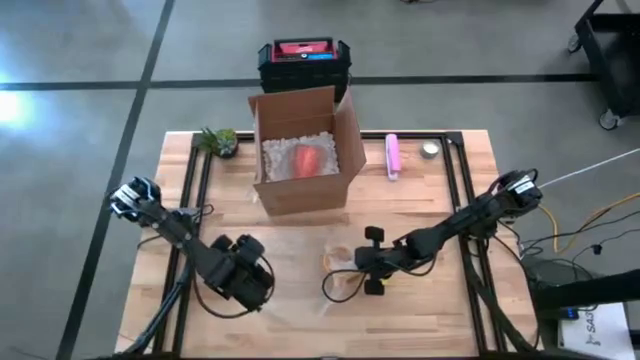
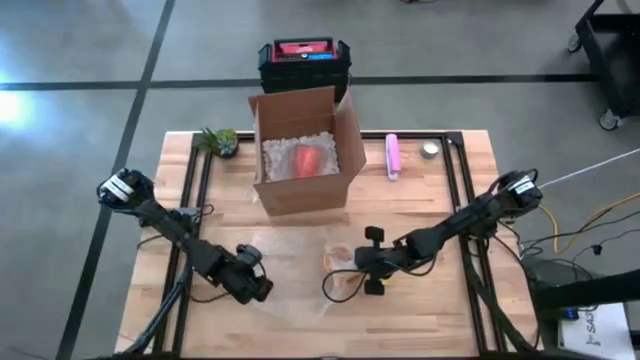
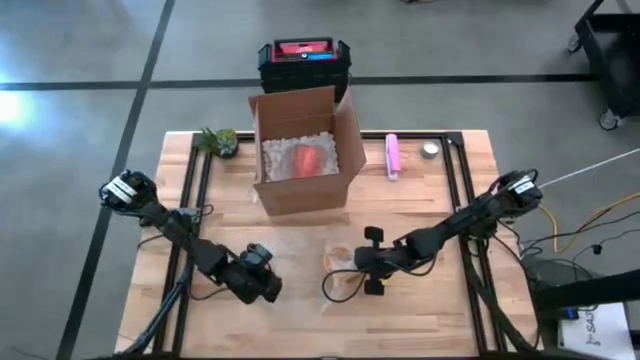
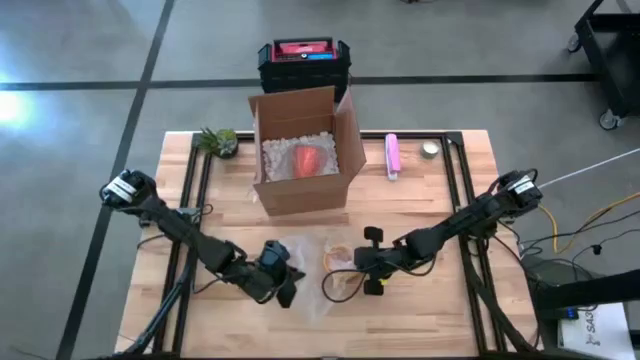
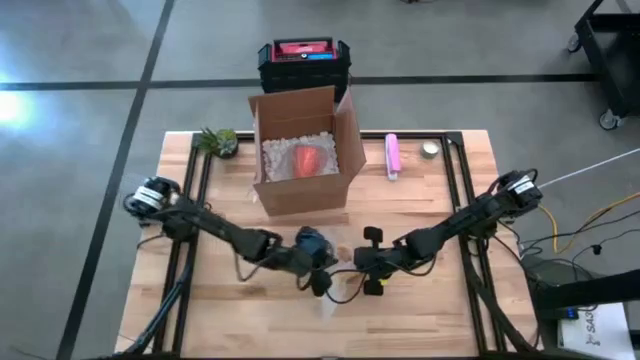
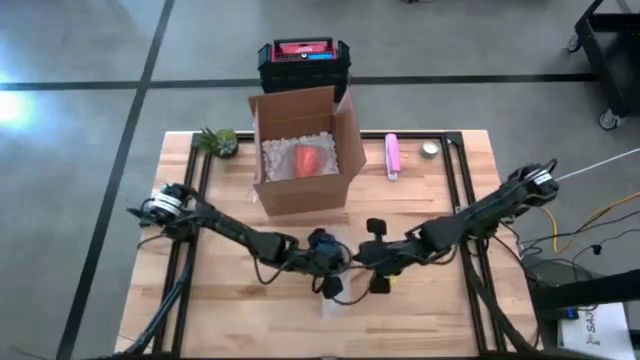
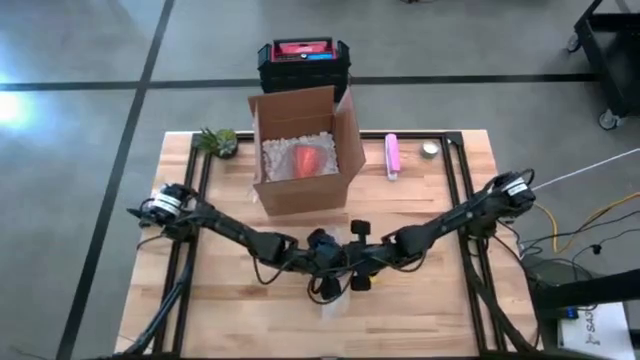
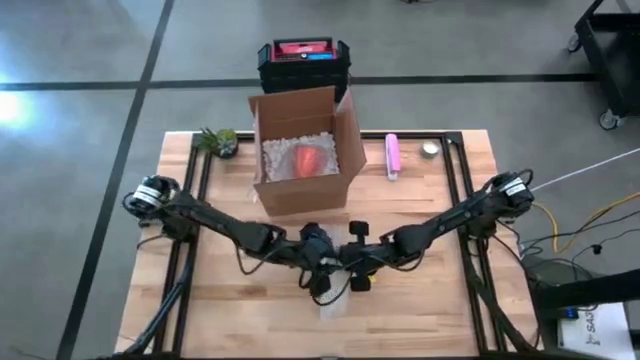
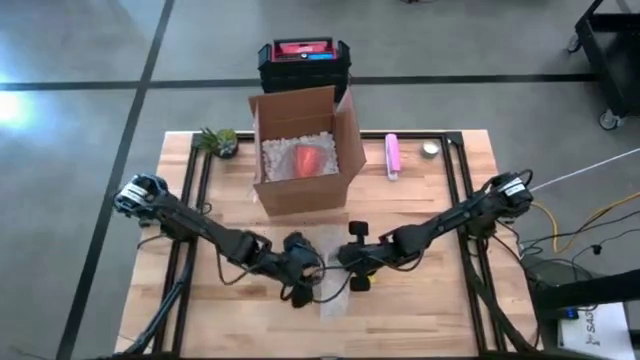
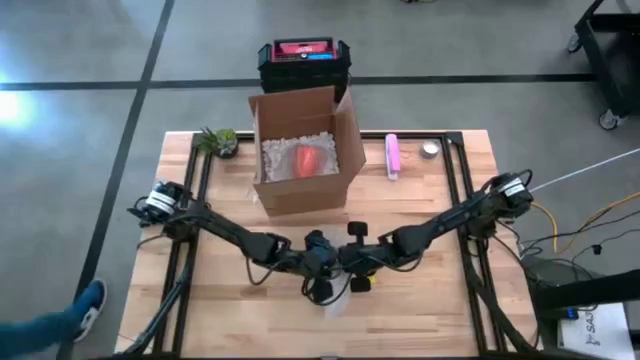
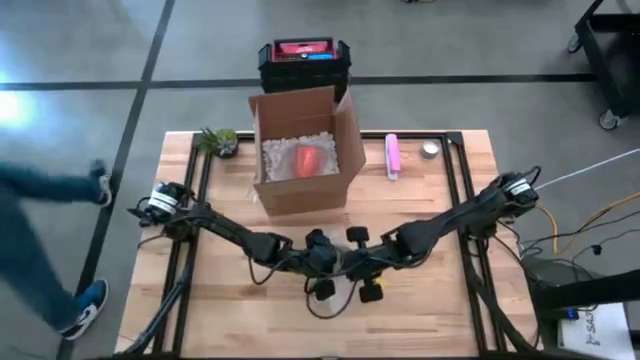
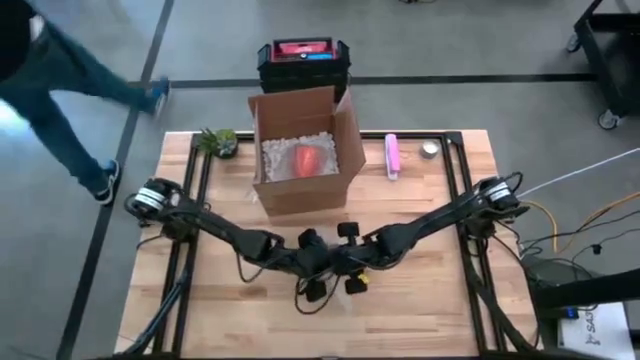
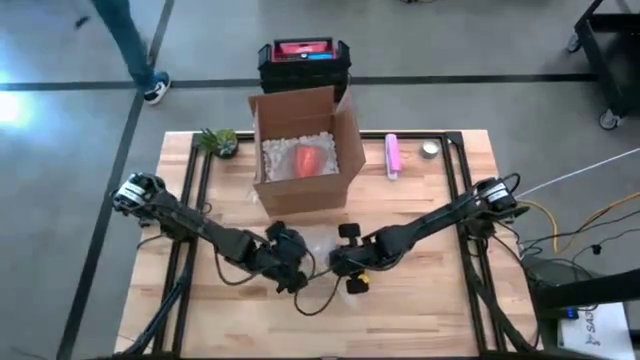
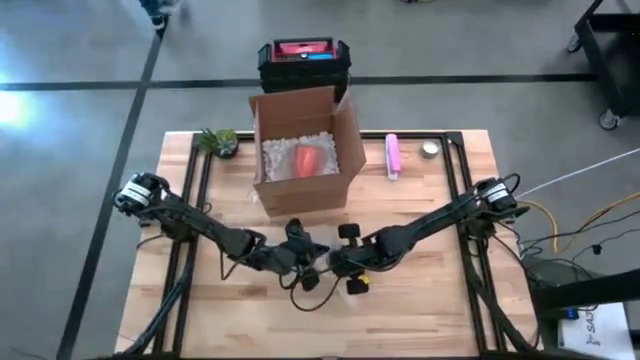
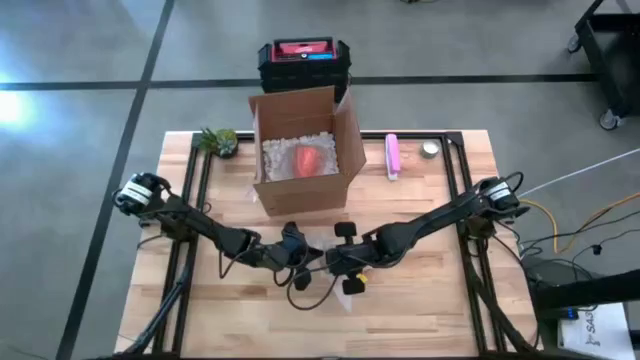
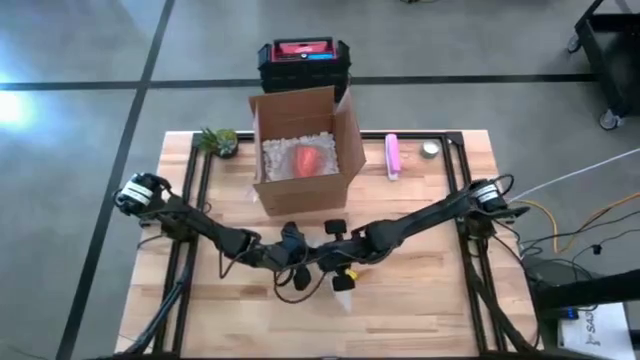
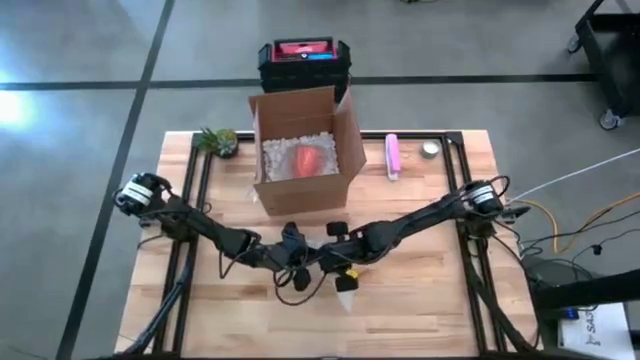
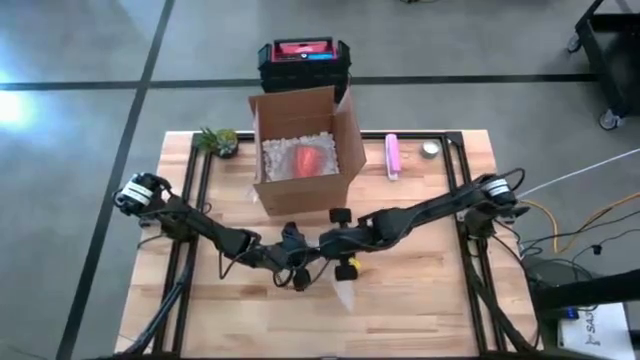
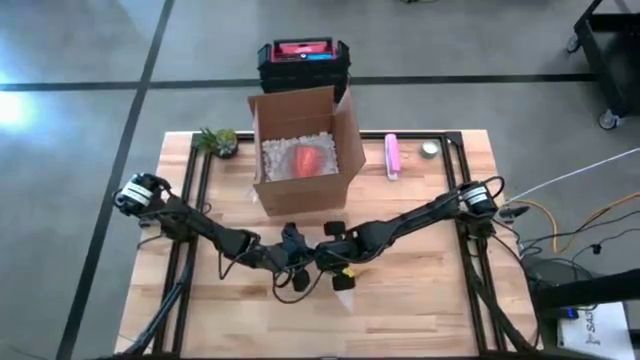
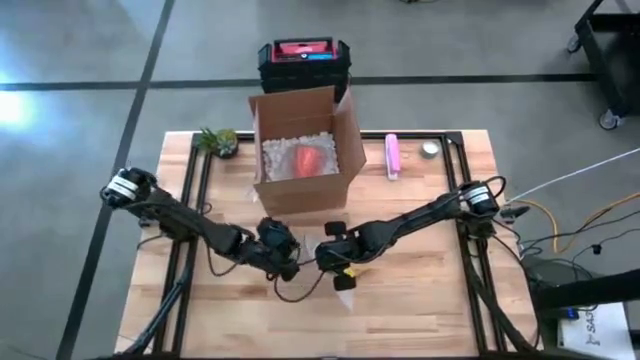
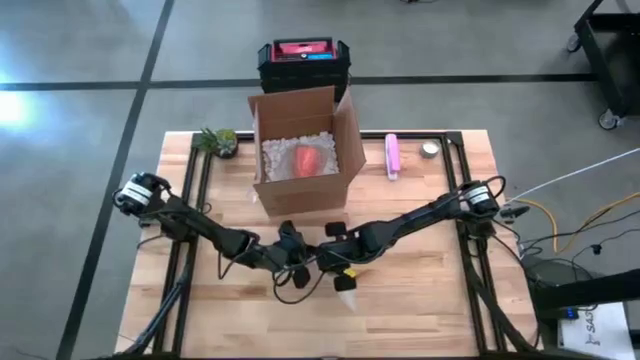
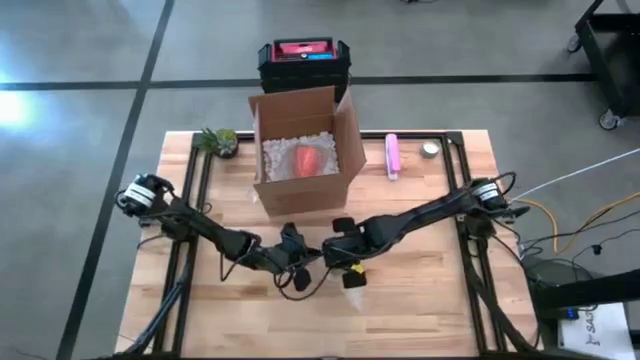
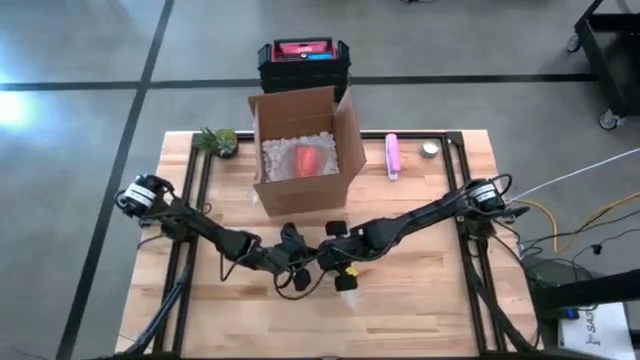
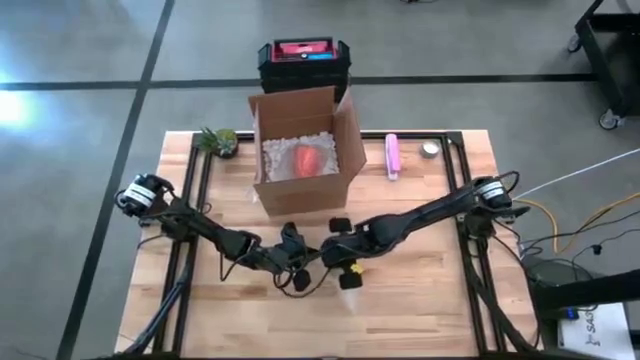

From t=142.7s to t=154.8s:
Task: wrap mug
Wrap the yellow mug in the transparent bubble wrap

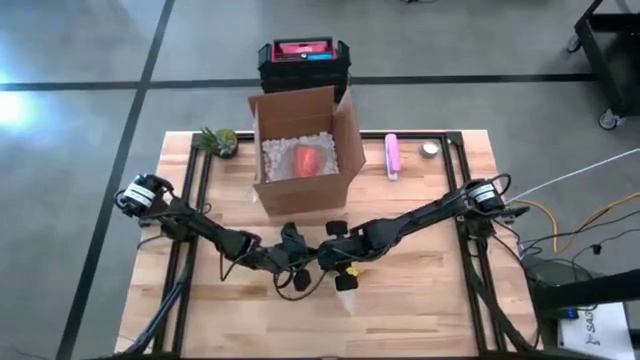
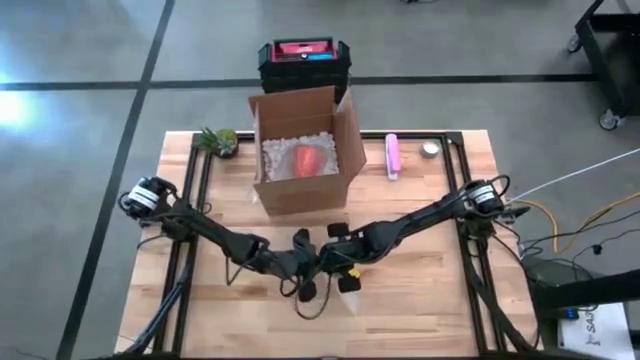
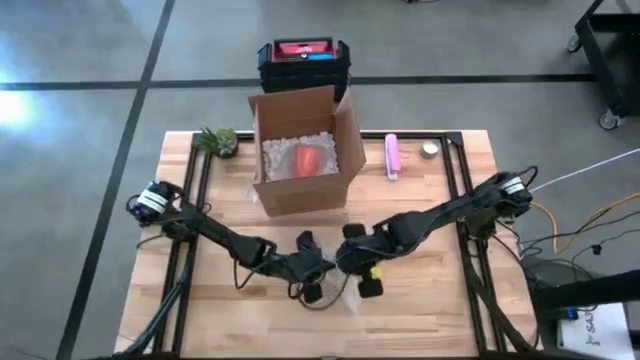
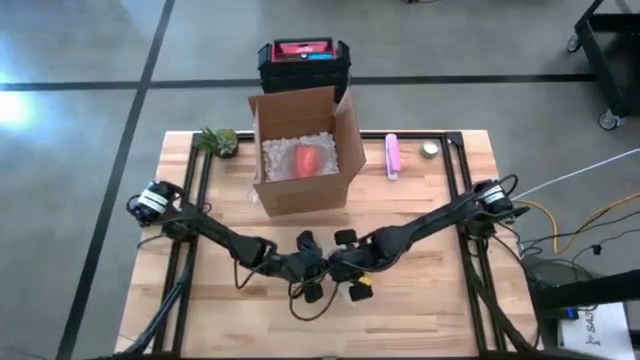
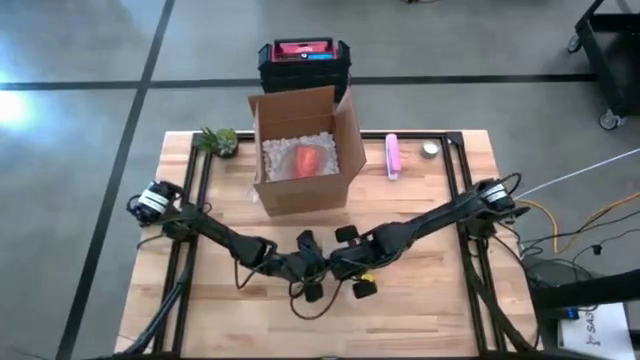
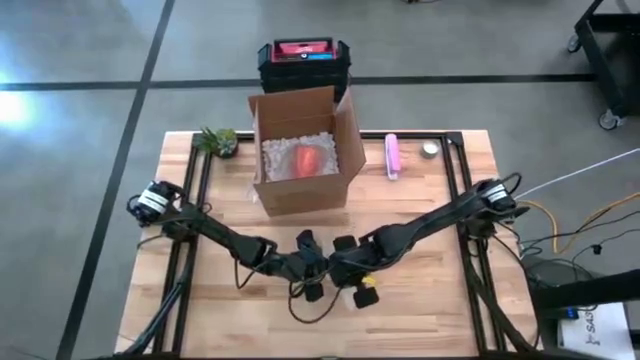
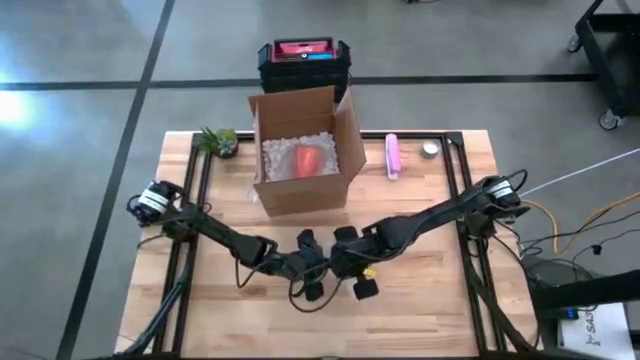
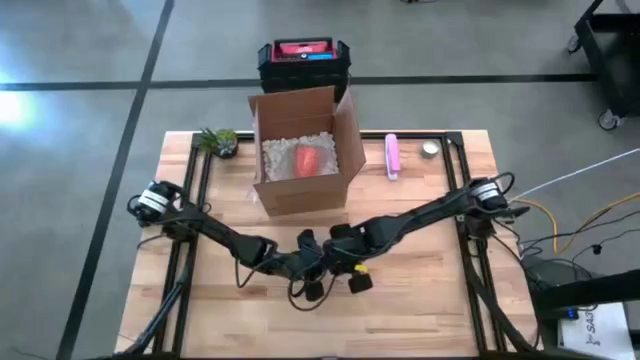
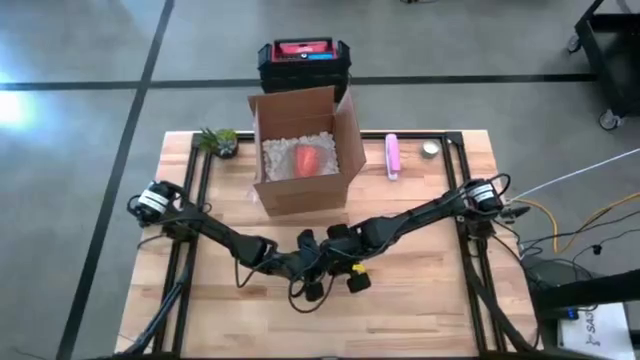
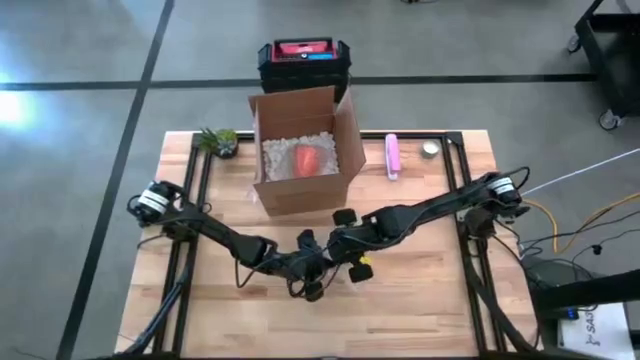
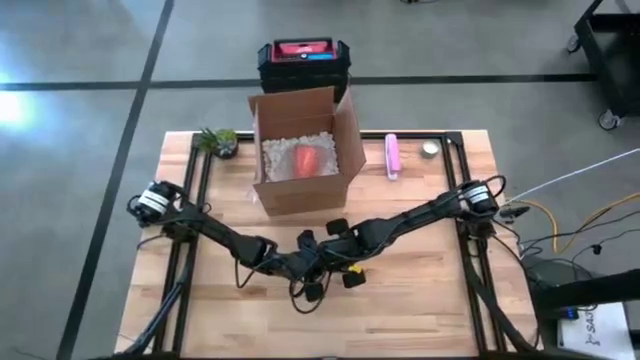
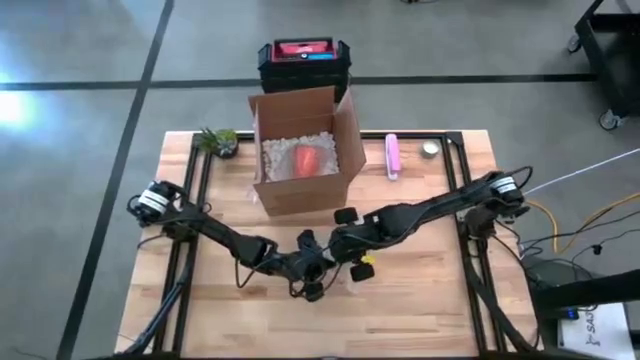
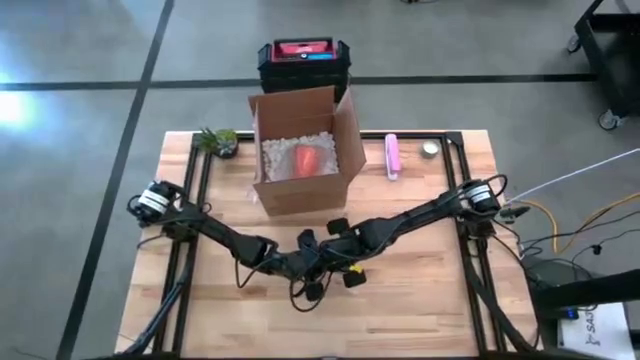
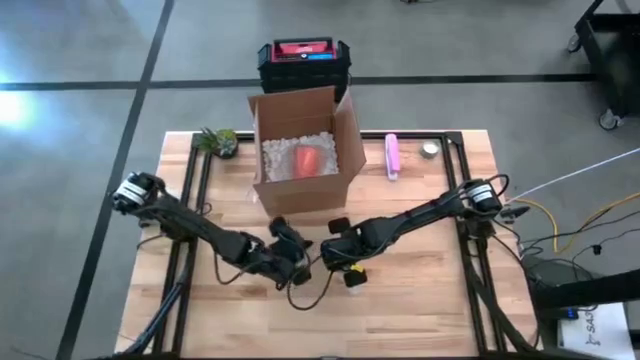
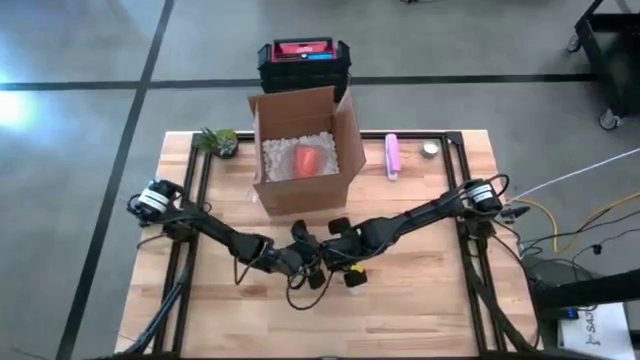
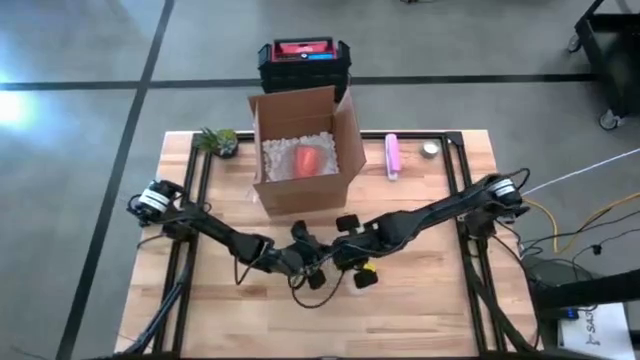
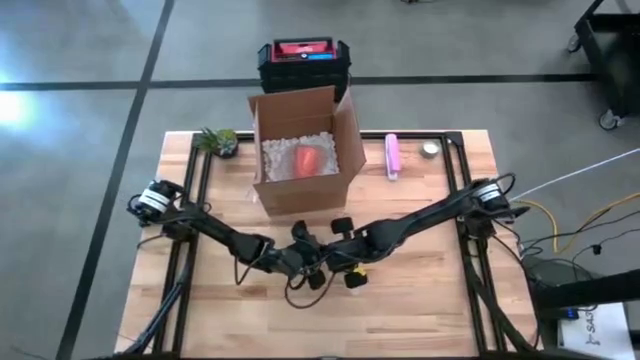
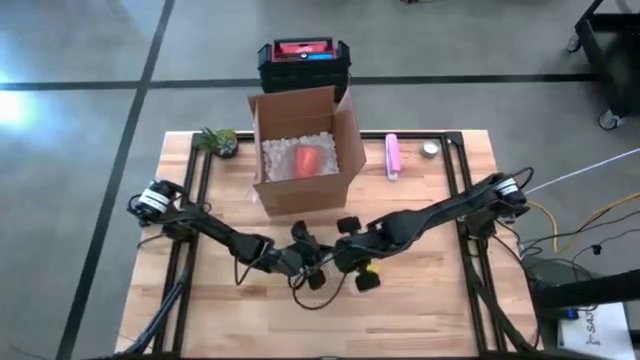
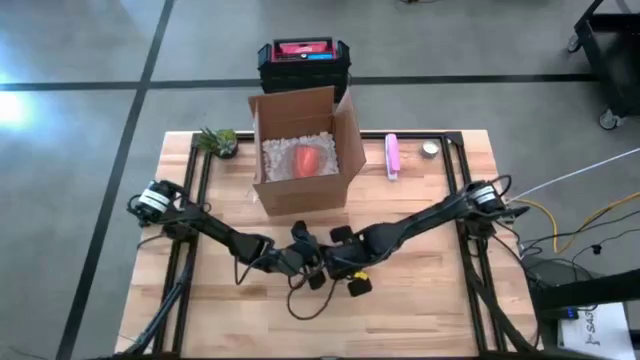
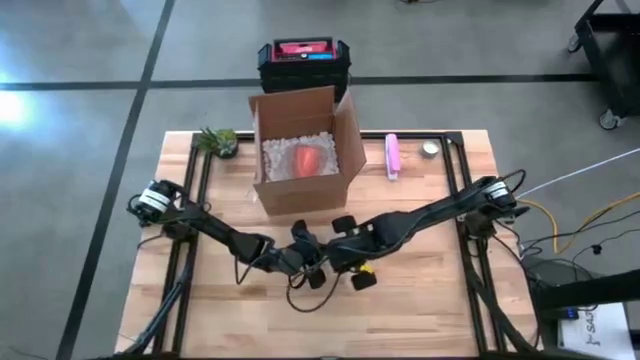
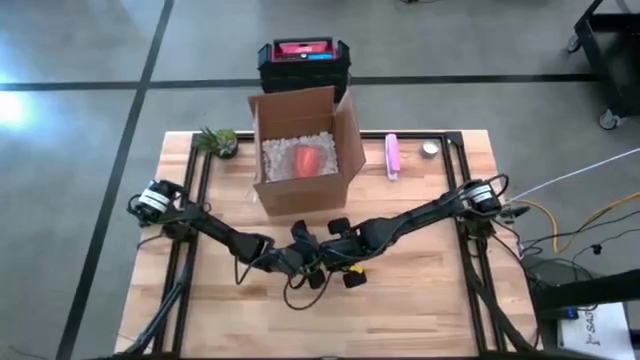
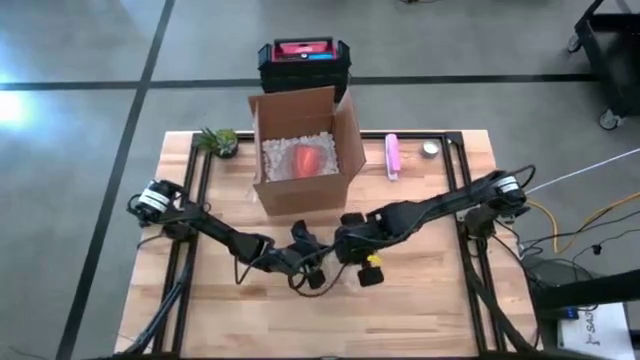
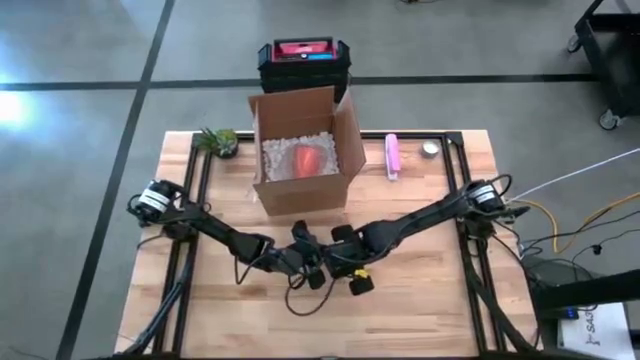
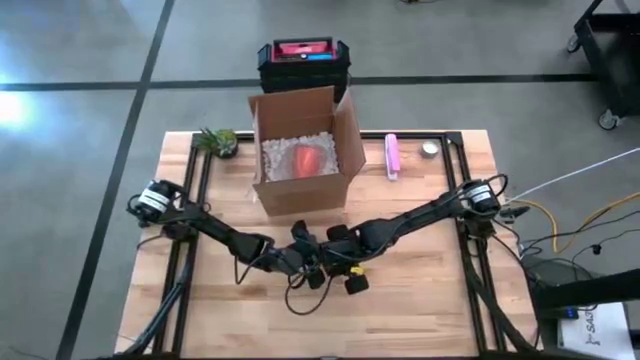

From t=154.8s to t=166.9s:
Wrap the yellow mug in the transparent bubble wrap
